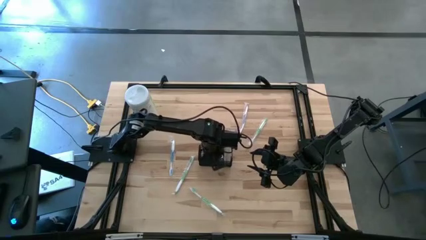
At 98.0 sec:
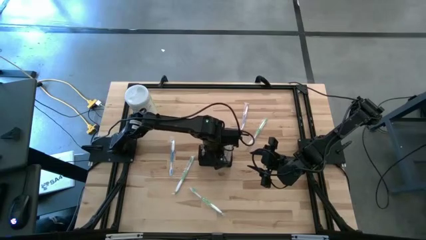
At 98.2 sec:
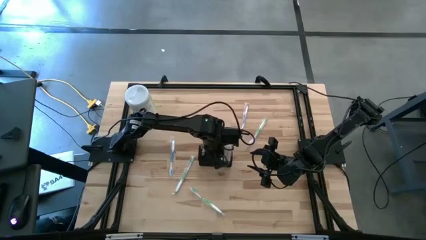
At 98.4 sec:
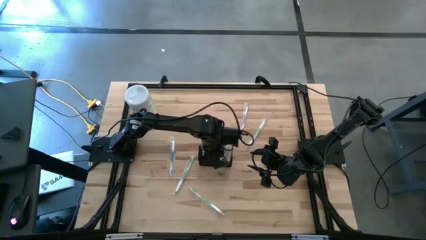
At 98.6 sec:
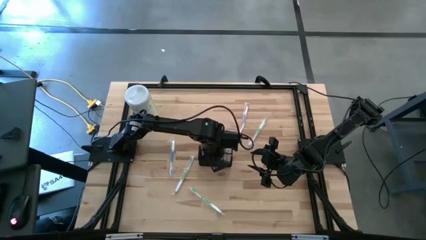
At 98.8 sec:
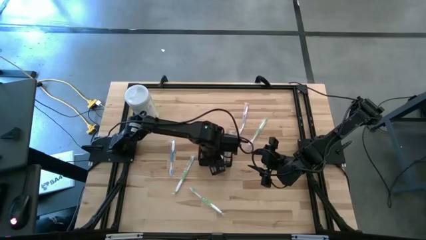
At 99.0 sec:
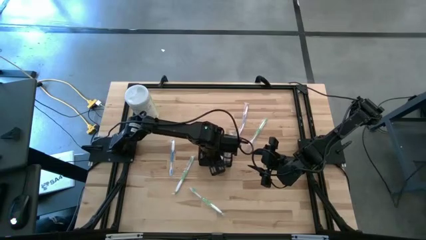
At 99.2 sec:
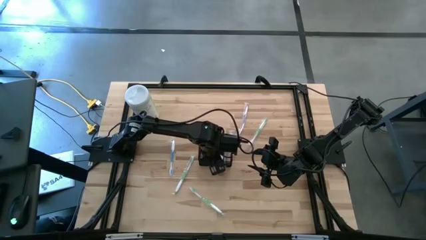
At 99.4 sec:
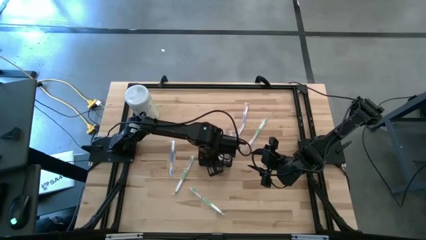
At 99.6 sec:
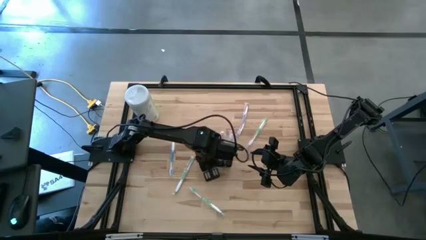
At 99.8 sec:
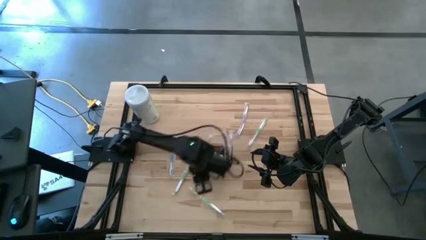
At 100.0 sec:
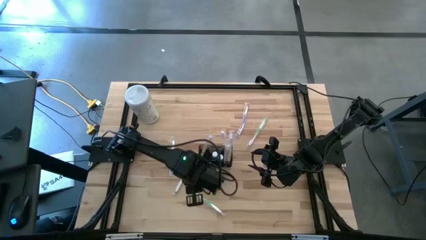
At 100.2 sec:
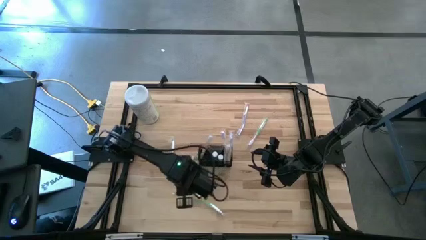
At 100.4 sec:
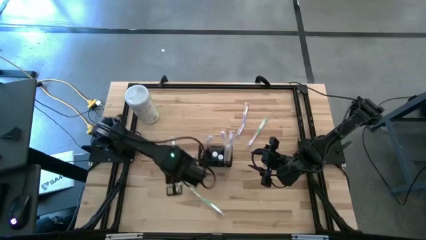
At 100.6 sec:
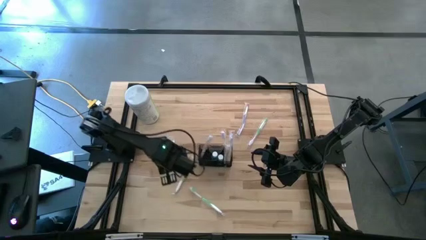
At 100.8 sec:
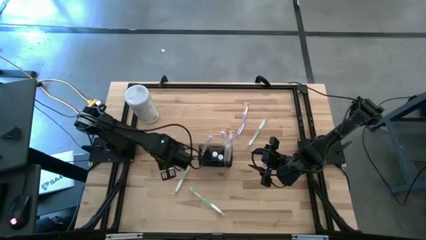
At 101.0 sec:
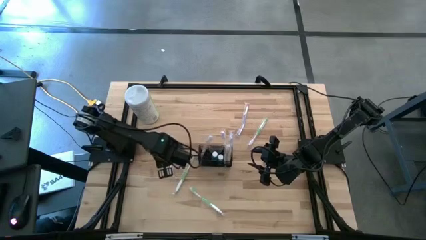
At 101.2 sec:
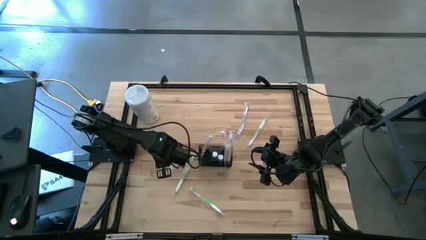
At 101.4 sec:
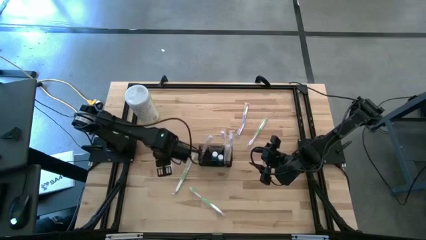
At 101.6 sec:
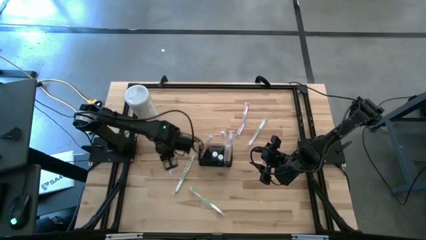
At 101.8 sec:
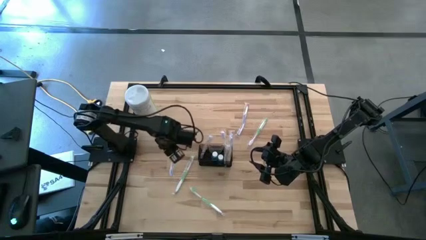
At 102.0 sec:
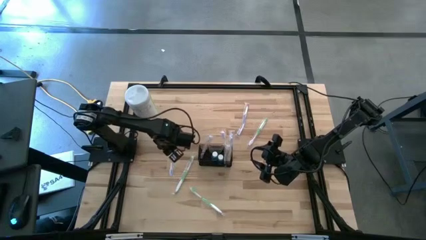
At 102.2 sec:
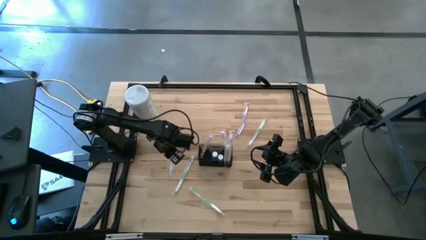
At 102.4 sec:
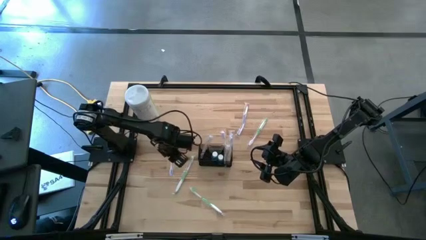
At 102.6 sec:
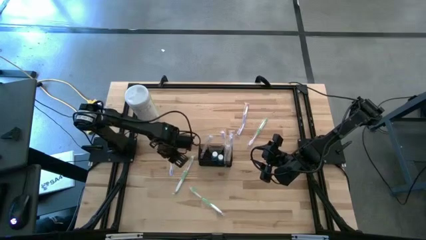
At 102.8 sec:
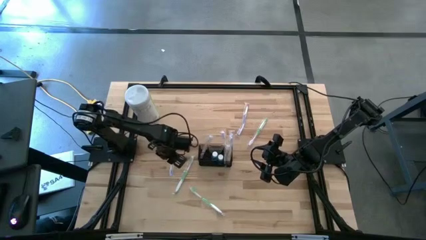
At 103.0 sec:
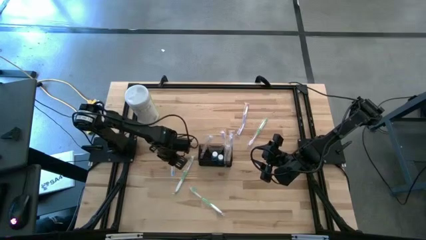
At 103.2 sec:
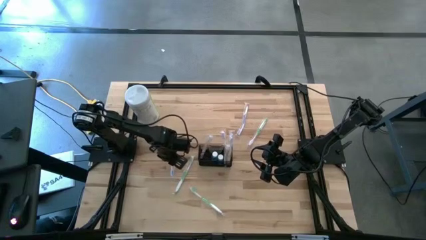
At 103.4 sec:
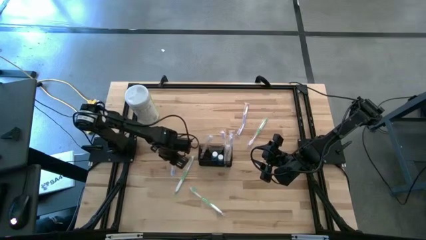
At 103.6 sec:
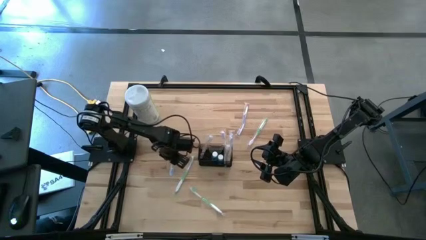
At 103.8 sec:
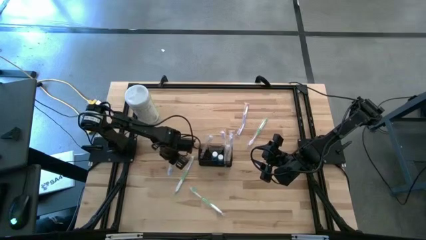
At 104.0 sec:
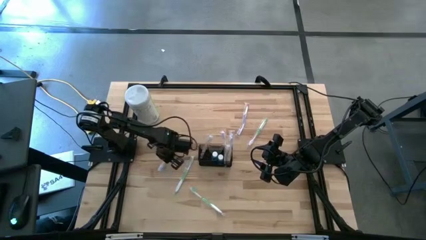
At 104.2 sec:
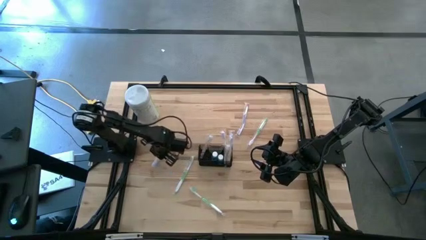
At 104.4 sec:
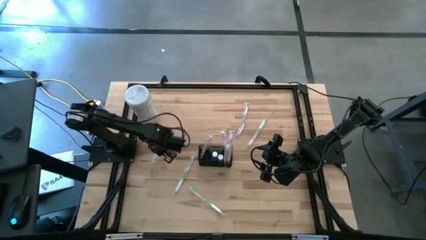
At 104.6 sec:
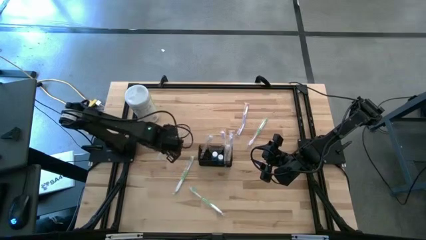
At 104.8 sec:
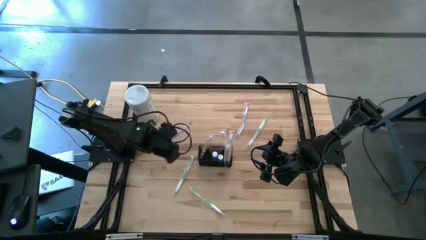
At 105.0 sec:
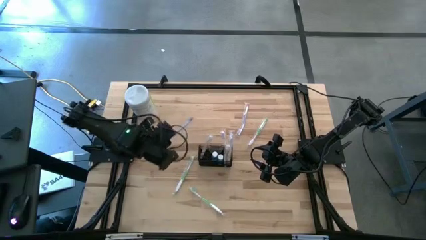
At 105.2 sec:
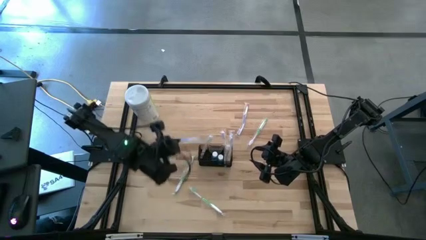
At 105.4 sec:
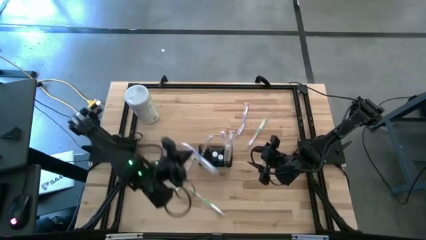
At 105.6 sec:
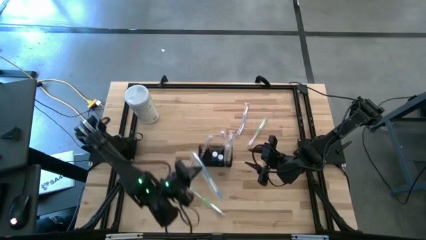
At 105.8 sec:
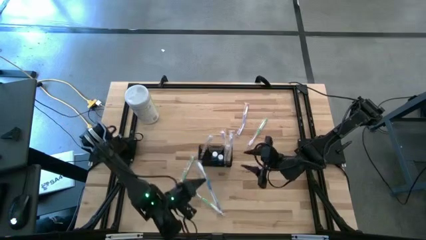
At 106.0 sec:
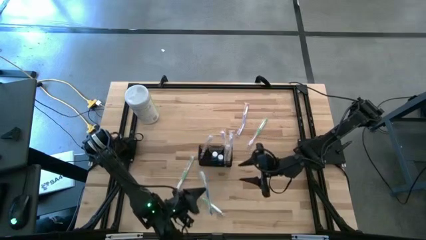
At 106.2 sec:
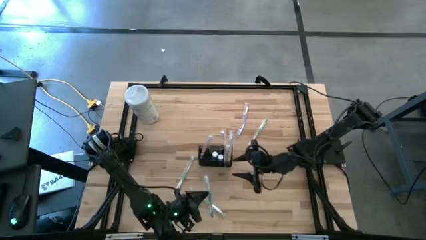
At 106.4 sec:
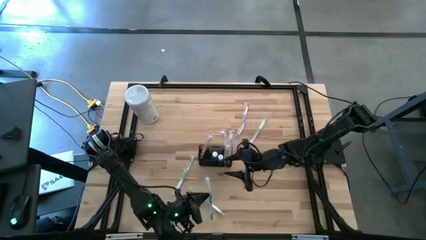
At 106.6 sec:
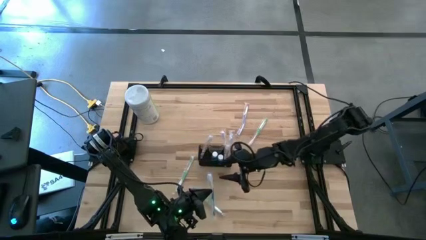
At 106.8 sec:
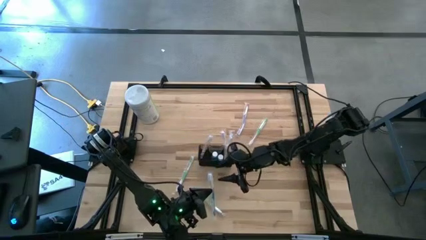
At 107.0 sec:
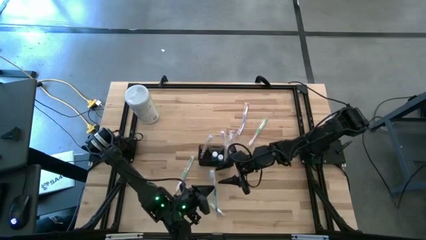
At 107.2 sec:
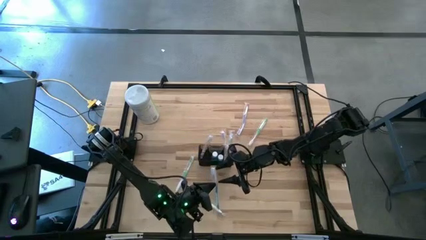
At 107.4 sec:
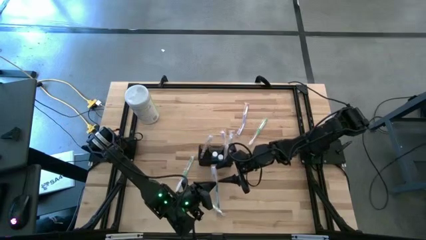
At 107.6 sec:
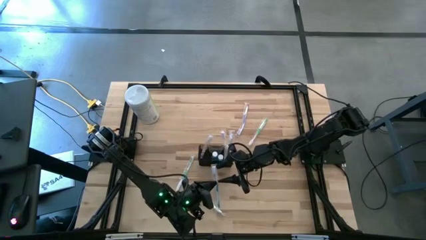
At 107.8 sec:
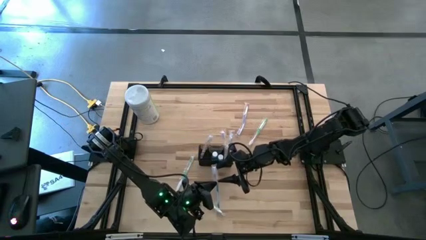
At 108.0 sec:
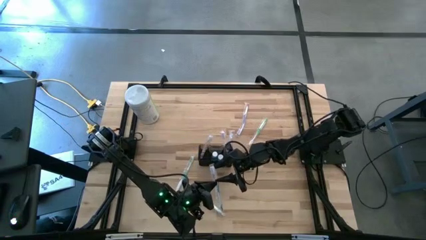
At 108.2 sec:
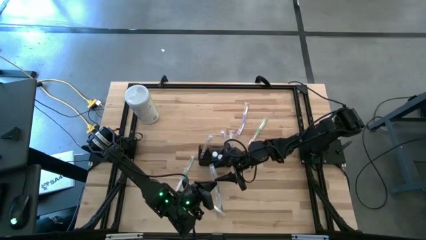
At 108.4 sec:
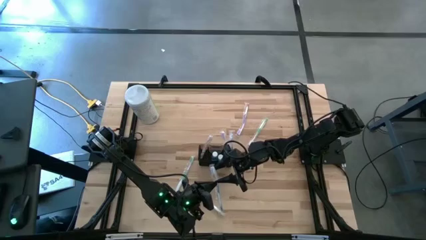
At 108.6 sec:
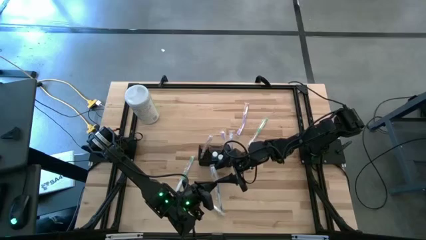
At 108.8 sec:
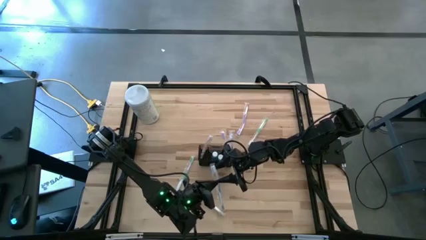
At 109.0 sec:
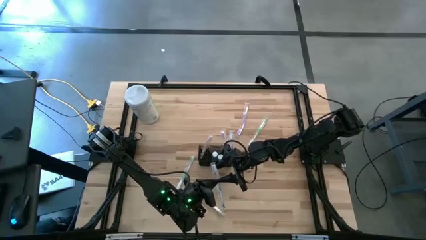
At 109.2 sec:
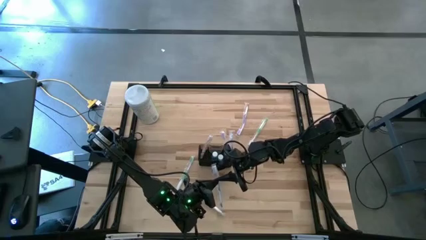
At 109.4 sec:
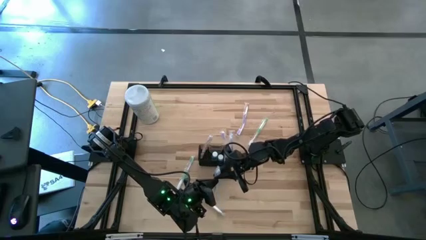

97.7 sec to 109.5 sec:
Task: Pick & Place toothbrushing station
Put the blue toothbrush into the black mesh
